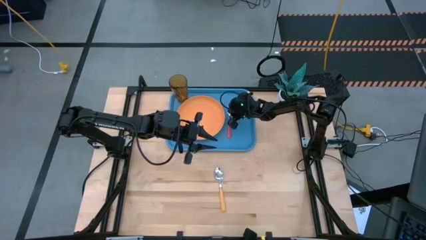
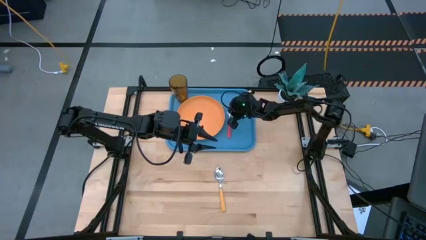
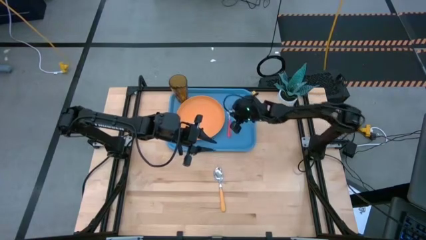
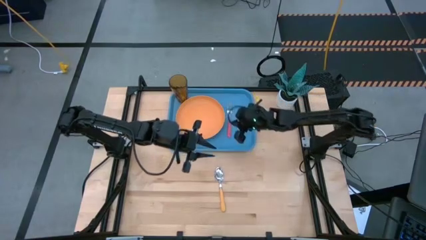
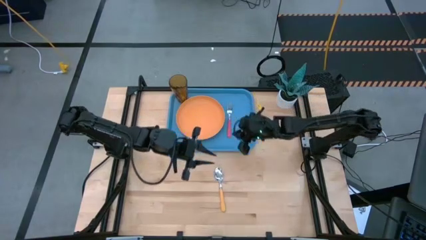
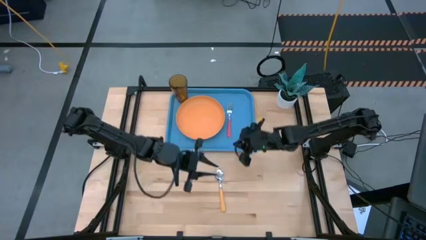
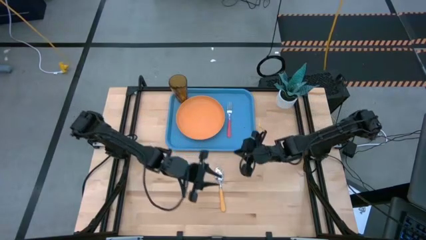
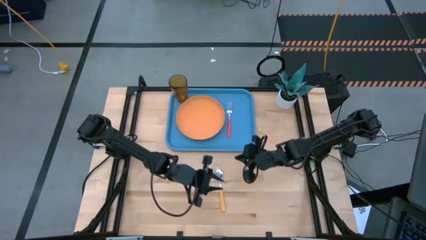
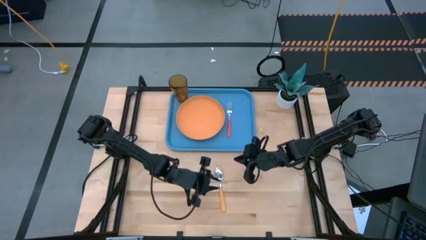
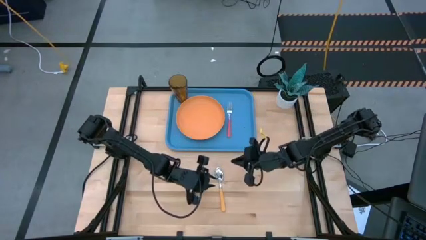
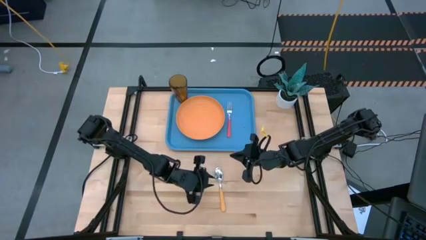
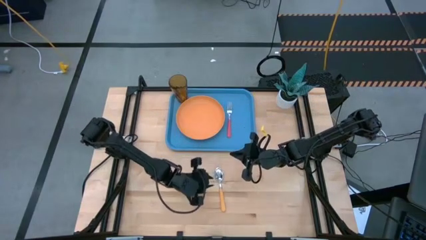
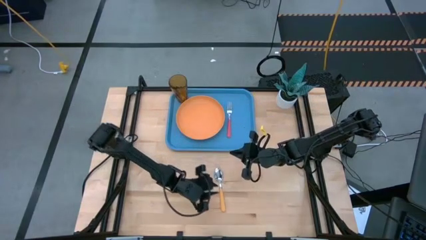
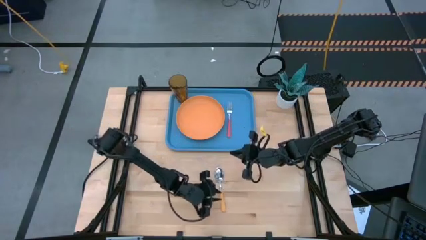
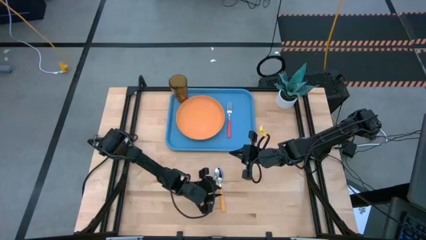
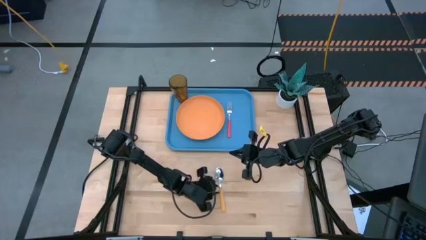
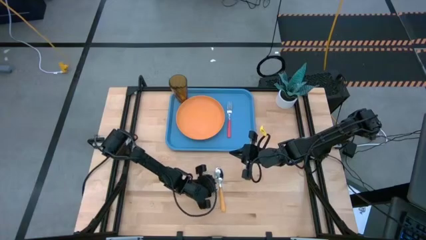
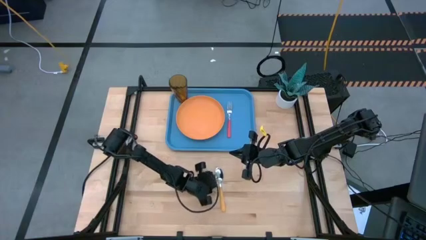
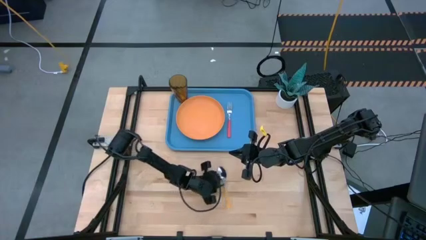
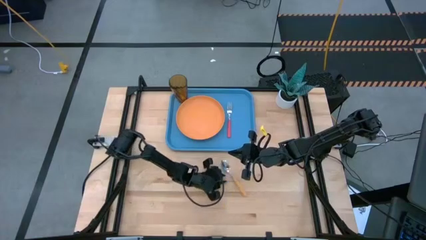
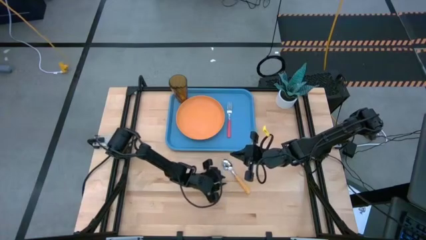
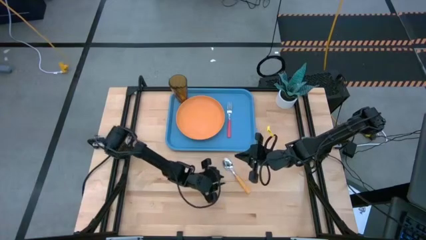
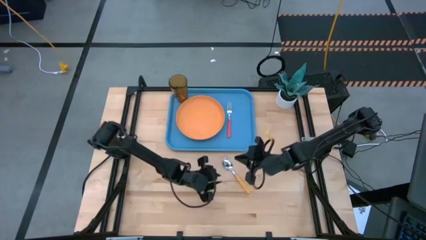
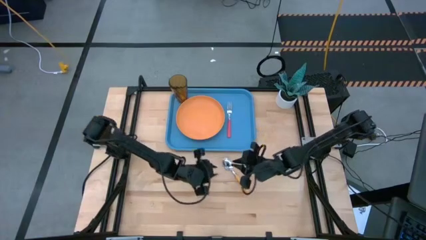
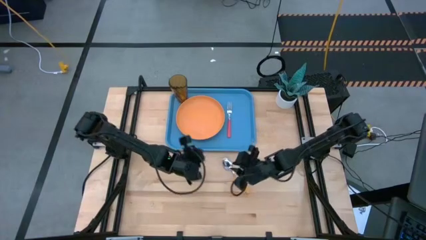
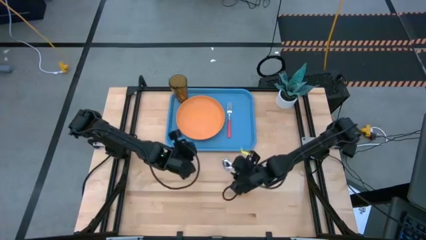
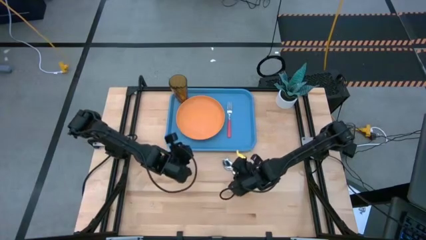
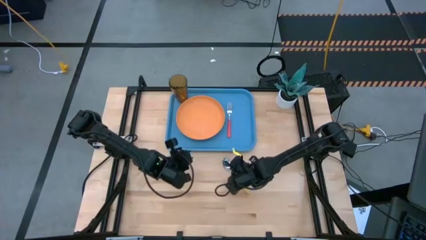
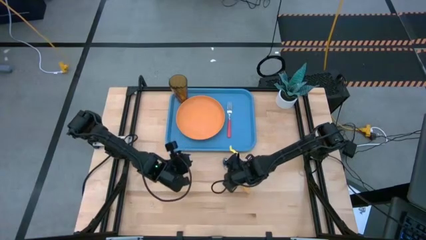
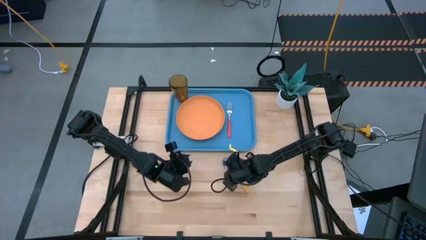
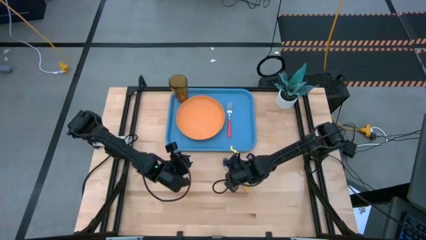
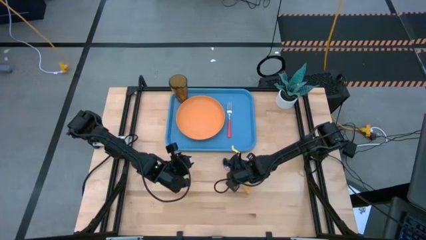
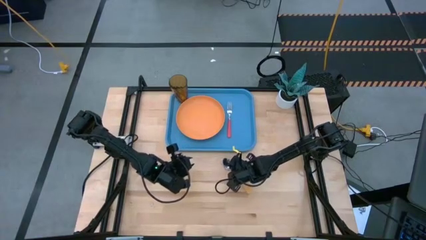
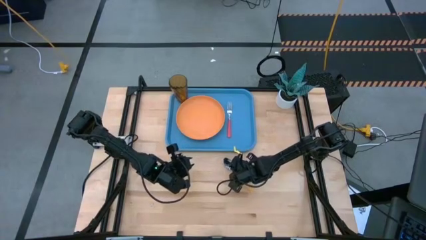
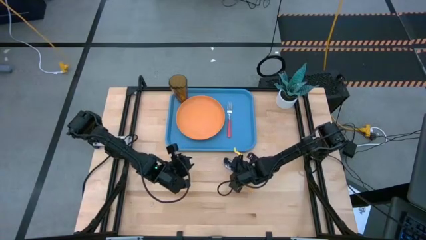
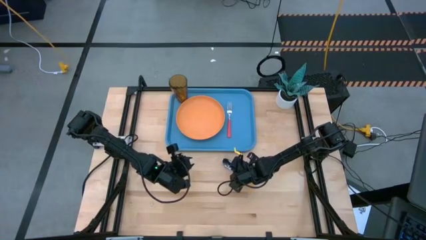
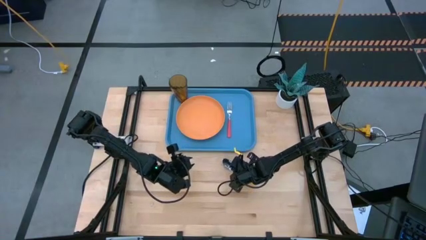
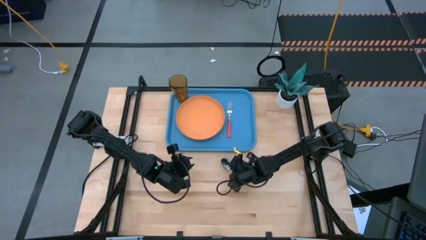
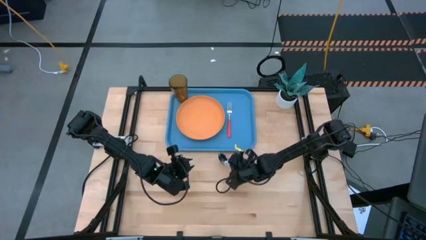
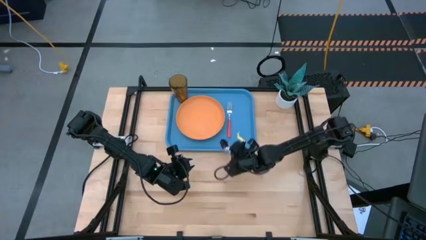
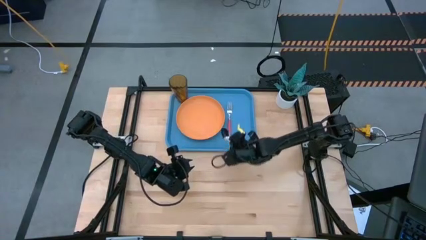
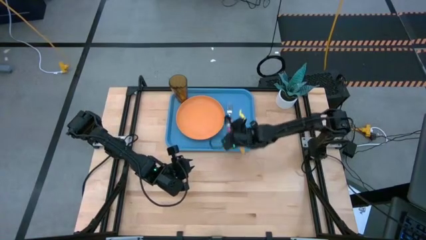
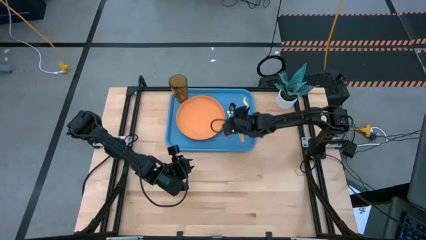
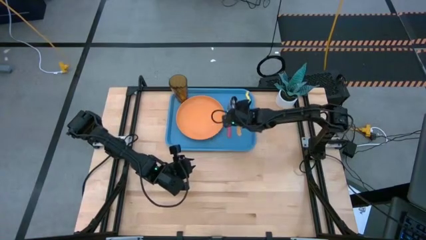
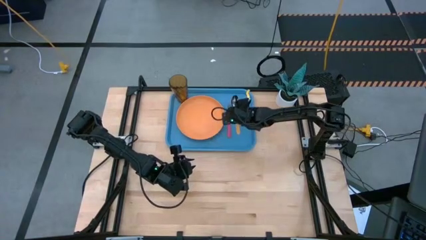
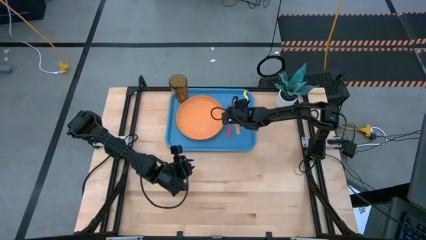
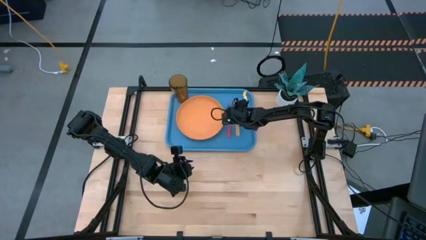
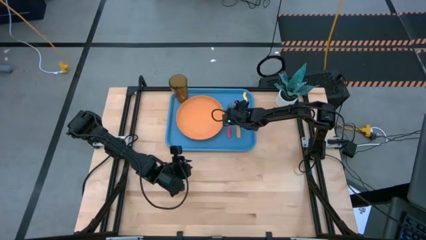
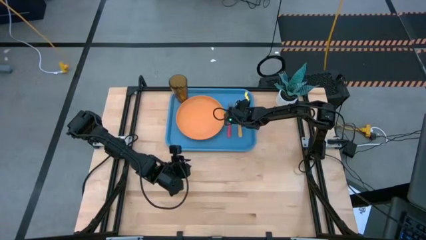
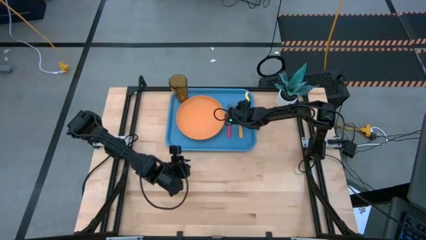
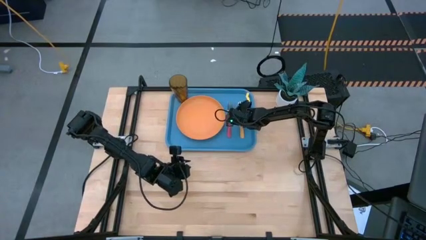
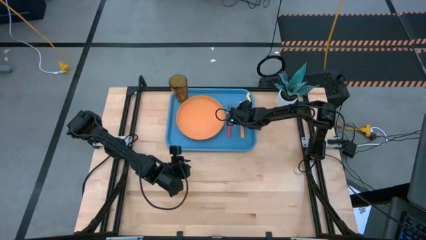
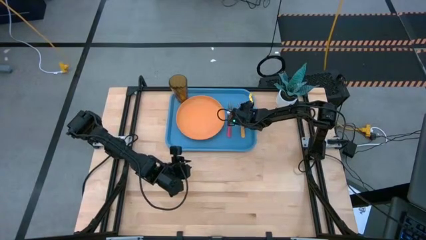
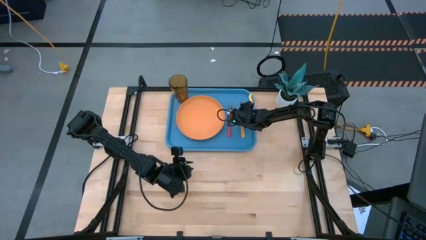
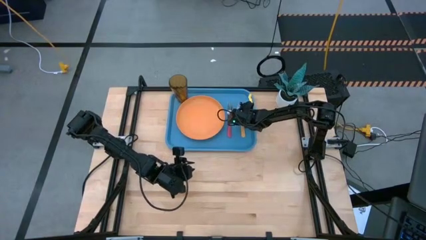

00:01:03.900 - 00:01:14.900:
Task: Pick and place plate/cup/fork/spoon on tray
Put the yellow spoon on the right side of the pink fork
